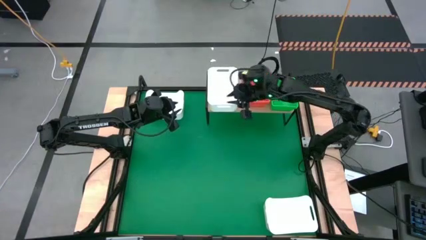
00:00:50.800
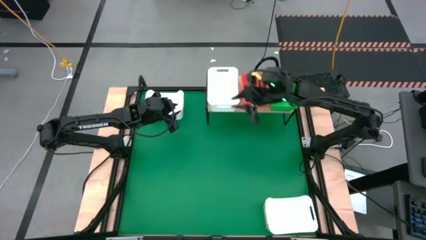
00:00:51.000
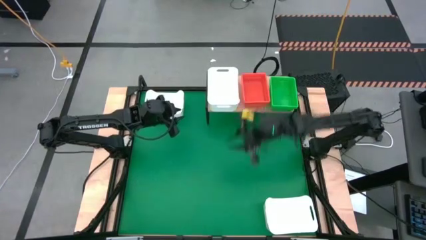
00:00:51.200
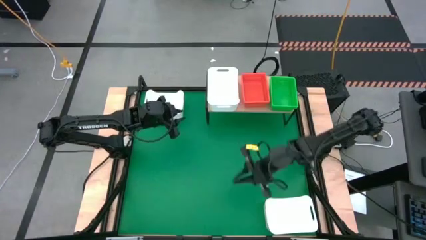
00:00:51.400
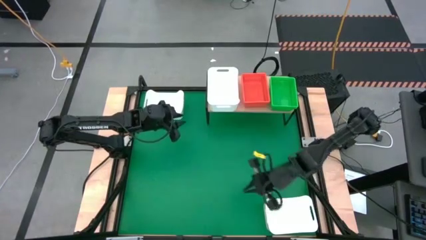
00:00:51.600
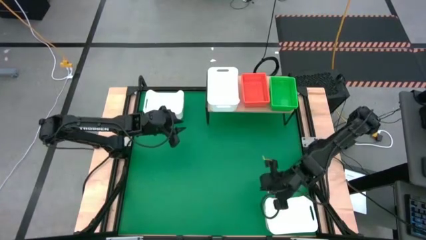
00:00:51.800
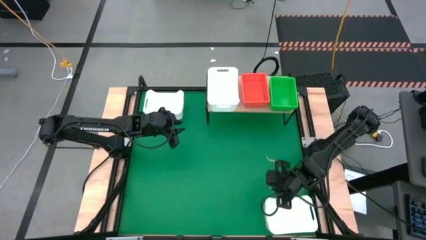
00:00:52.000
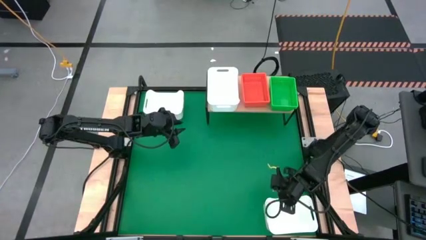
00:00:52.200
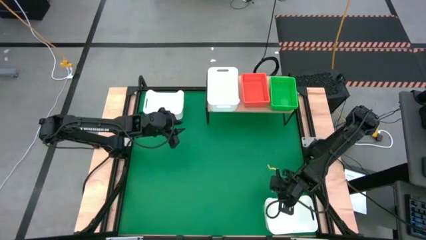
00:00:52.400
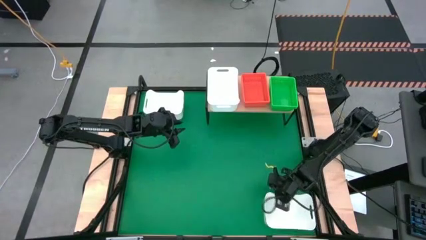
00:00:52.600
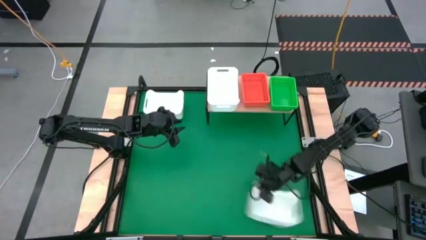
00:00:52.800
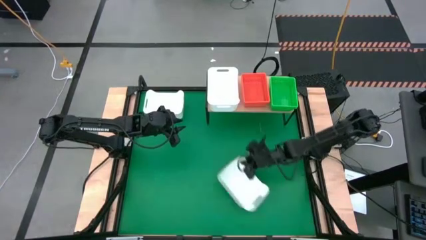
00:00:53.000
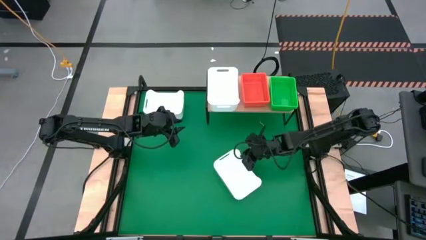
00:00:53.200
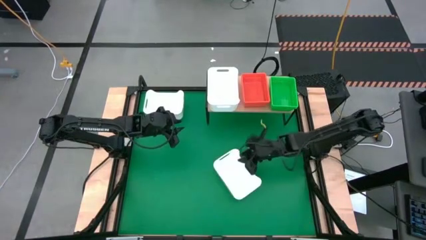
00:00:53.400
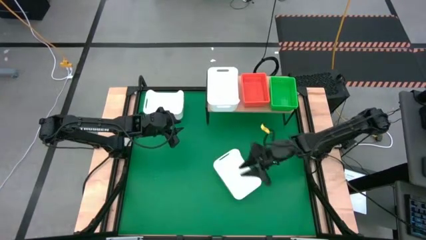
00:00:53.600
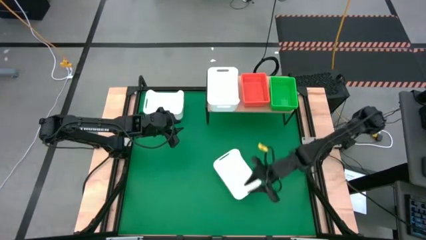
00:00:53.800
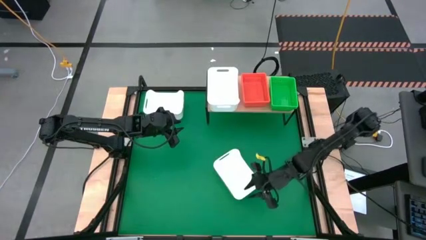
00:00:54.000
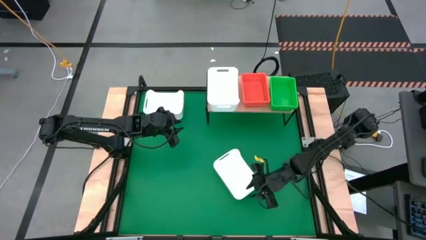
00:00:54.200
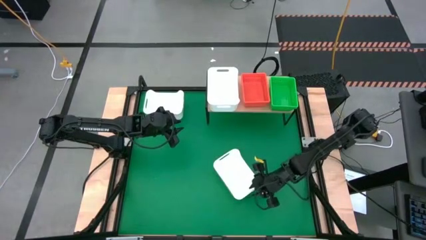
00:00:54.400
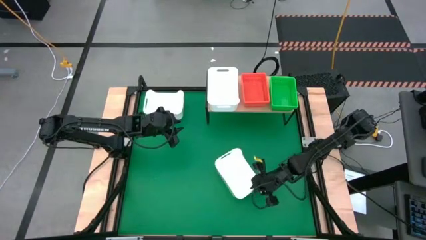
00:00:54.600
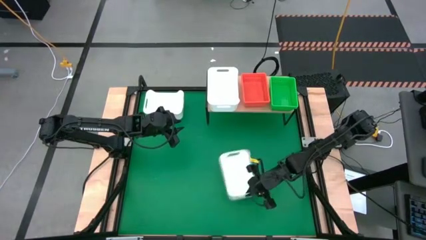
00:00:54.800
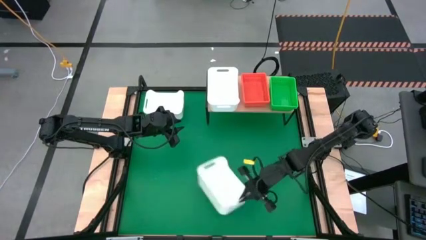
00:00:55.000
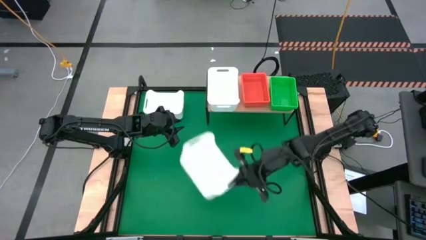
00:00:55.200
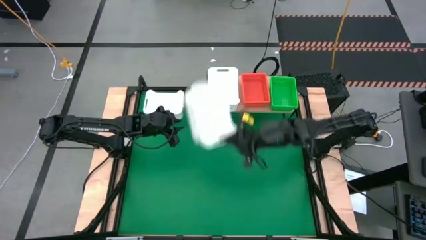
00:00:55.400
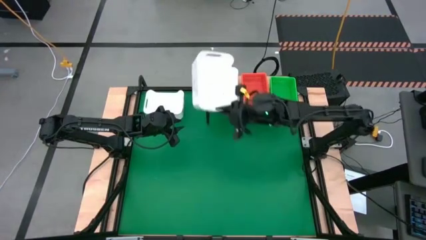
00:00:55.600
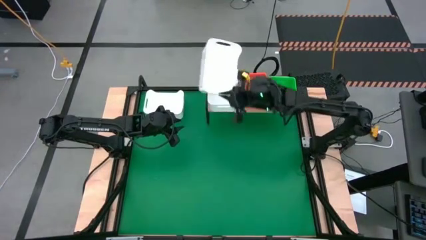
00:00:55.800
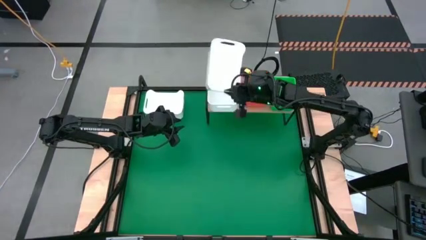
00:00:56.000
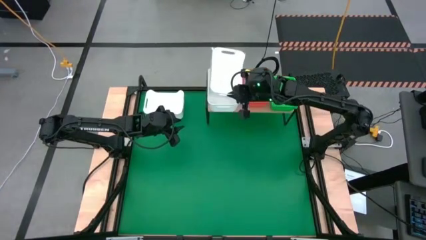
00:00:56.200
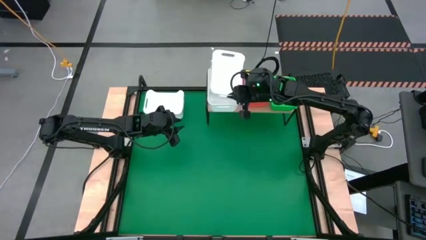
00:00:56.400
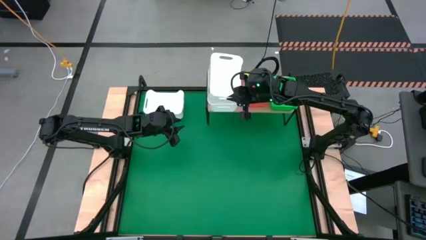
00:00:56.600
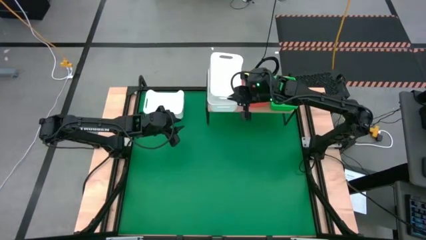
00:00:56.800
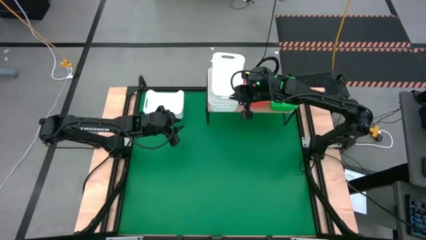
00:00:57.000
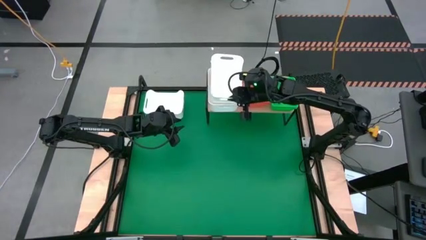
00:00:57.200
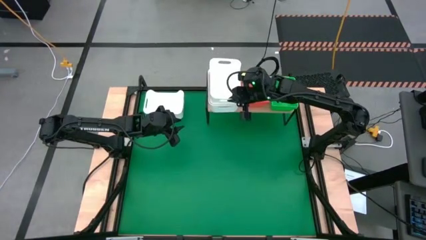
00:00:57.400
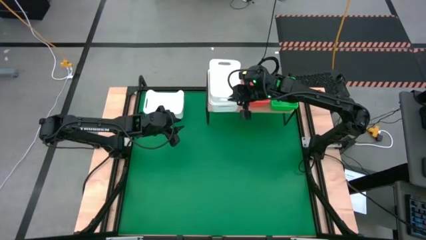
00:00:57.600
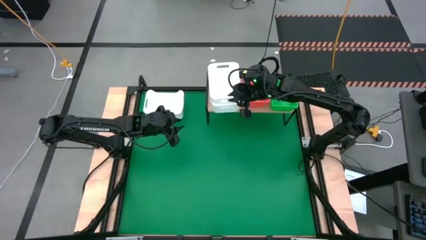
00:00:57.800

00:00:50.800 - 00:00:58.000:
Task: Stack baskets on shelf by color
Stack the bottom white bin on top of the white bin on the shelf

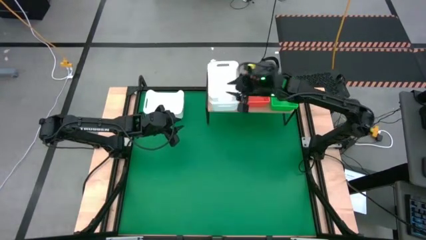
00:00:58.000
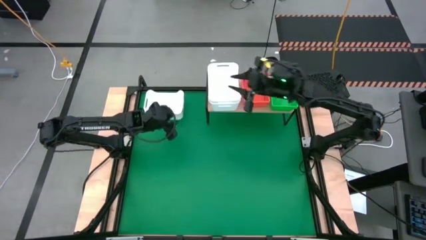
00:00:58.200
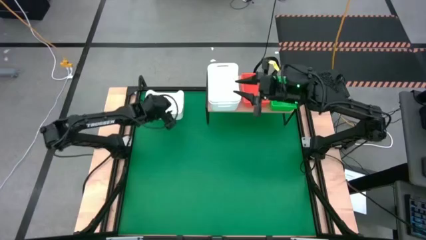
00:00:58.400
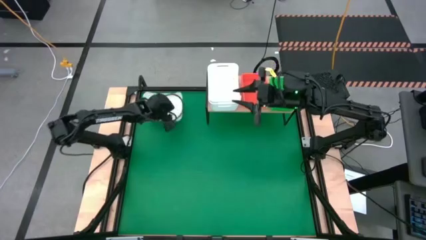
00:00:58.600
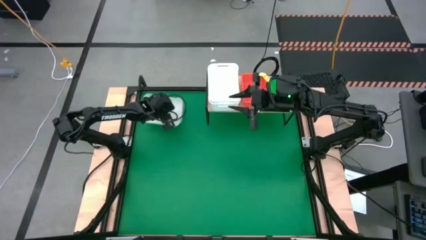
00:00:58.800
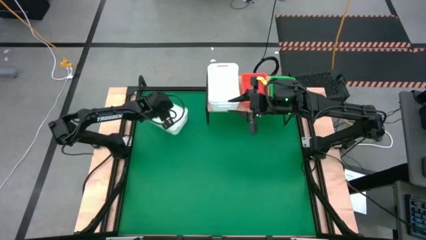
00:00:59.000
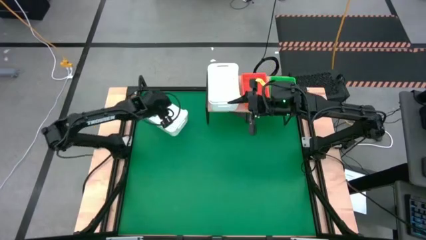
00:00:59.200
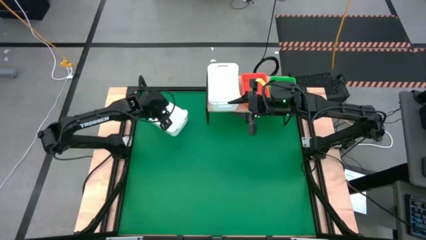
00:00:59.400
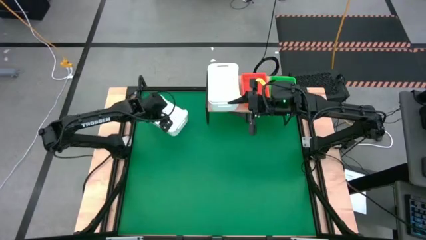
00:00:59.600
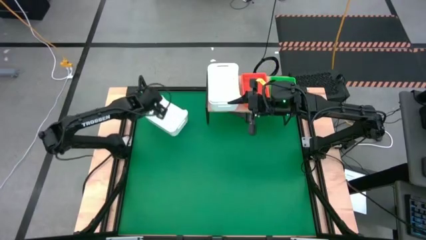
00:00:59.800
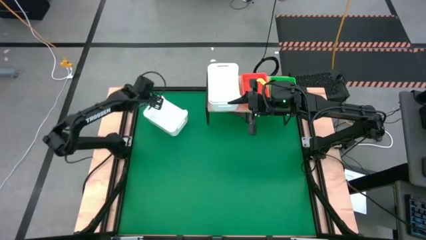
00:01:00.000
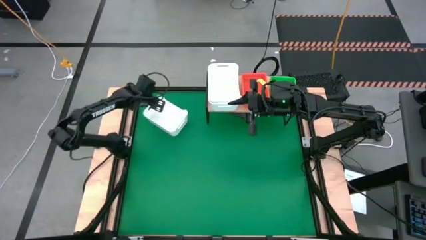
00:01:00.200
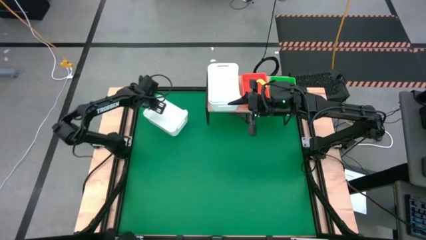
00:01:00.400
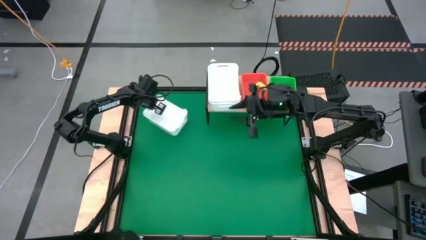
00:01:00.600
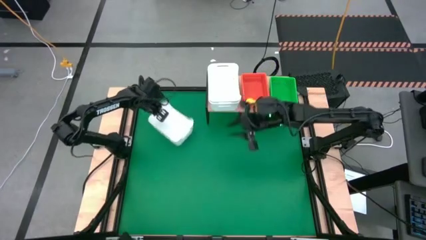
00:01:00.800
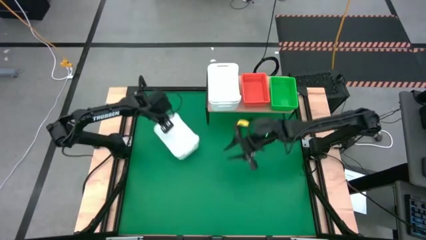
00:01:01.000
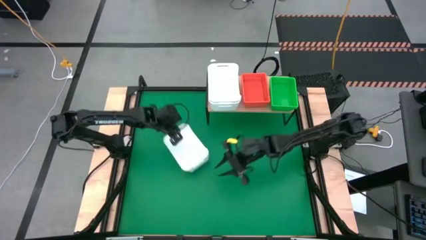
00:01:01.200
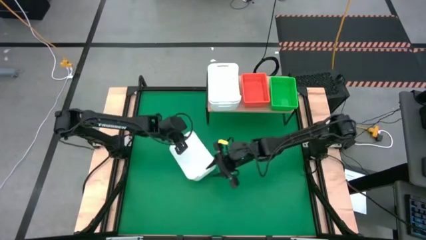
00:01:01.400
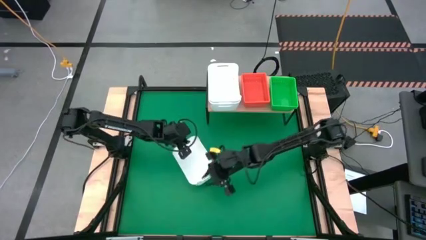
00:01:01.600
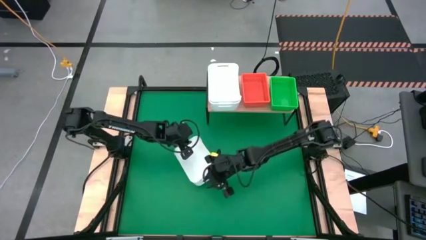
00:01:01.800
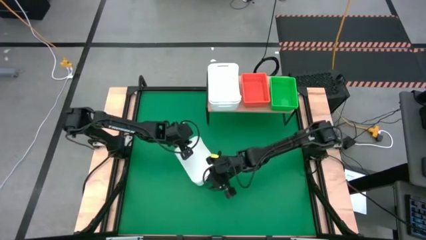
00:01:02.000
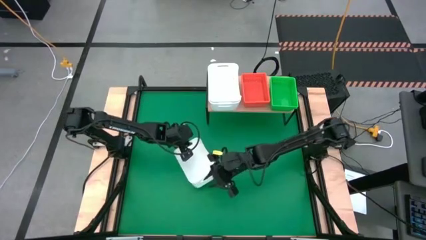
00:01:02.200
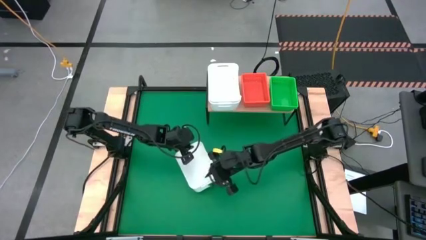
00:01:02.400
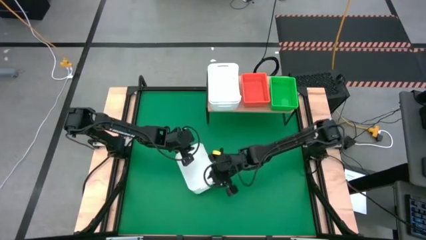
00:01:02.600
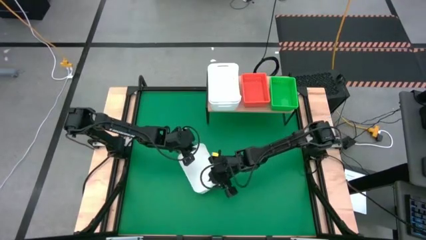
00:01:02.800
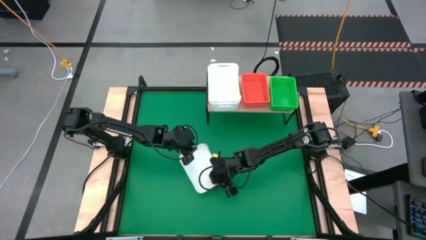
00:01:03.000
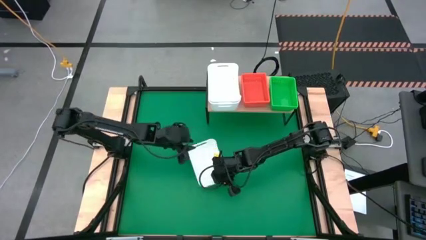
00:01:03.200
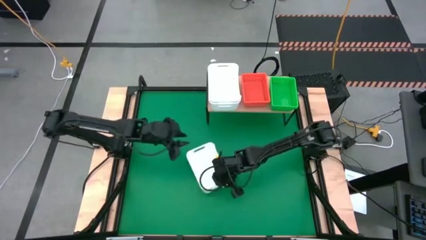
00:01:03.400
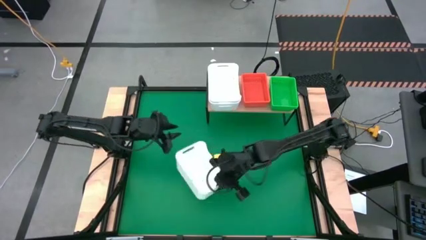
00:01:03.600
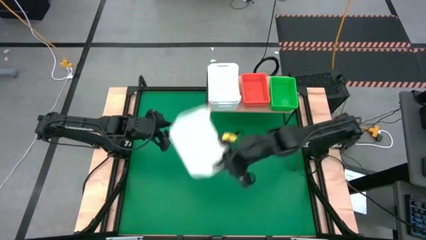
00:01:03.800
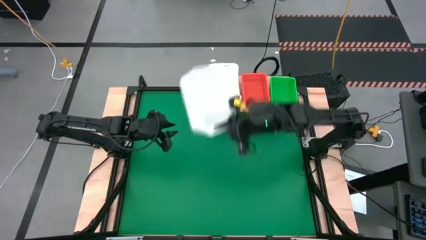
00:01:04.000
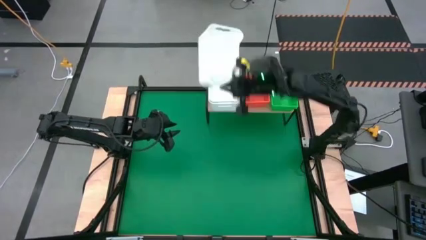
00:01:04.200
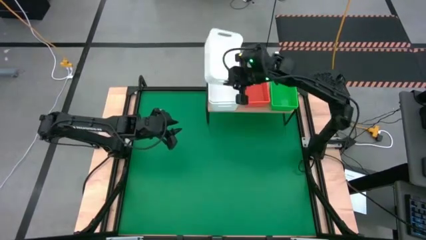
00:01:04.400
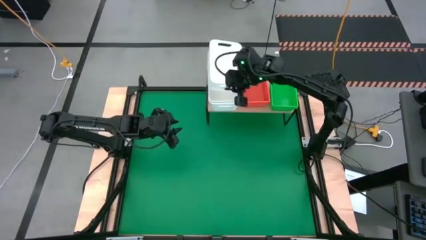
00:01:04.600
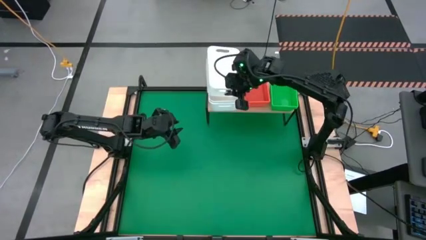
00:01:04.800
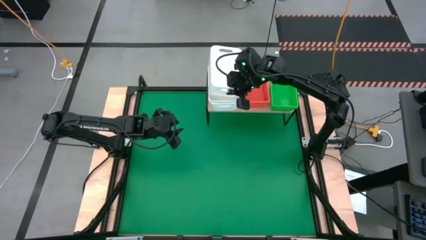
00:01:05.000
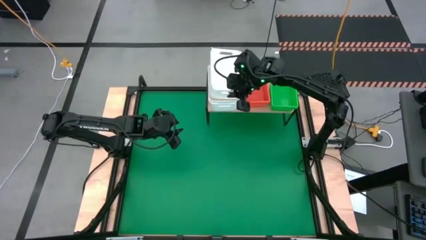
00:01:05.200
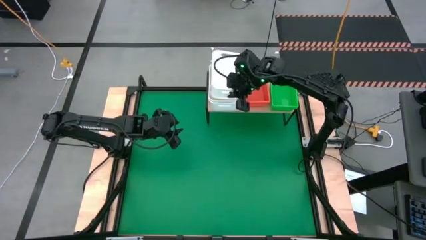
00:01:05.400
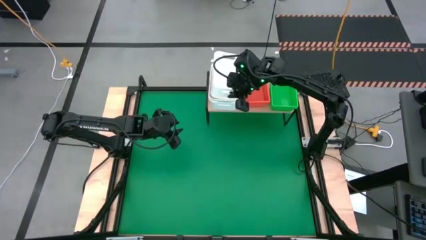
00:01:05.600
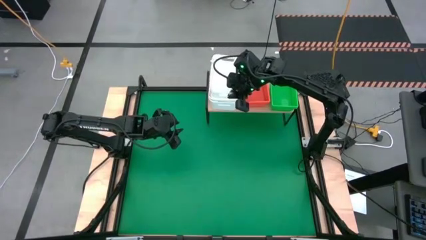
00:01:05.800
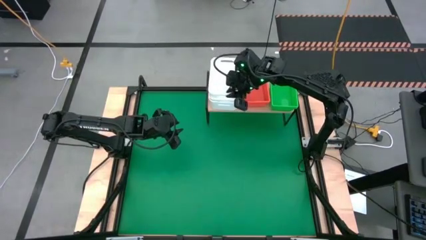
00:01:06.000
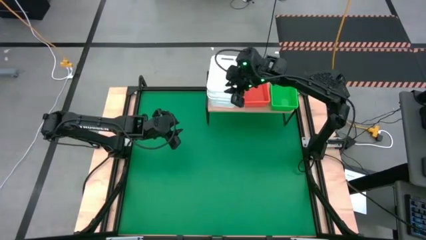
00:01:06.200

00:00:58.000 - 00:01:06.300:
Stack the white bin on top of the white bin on the shelf

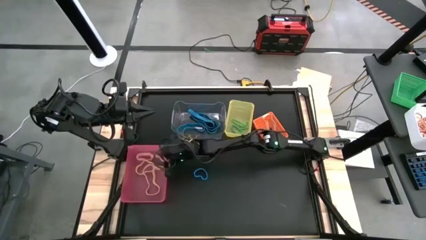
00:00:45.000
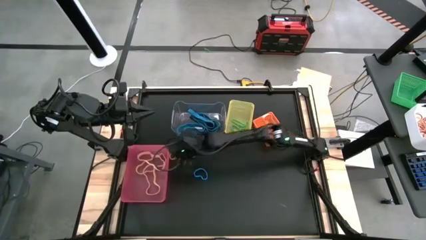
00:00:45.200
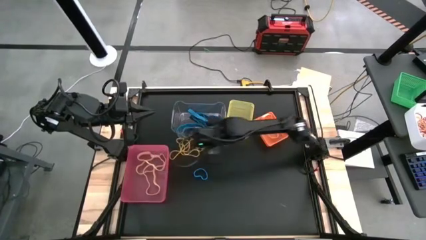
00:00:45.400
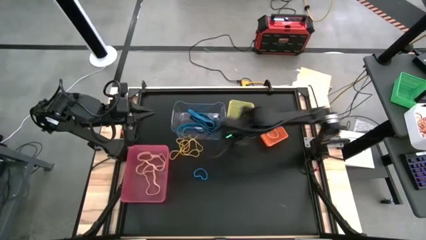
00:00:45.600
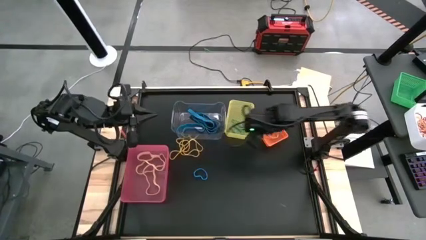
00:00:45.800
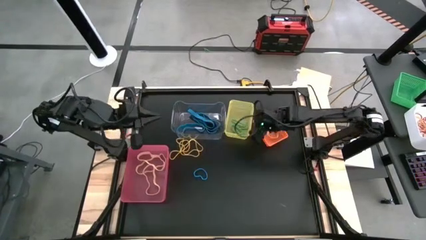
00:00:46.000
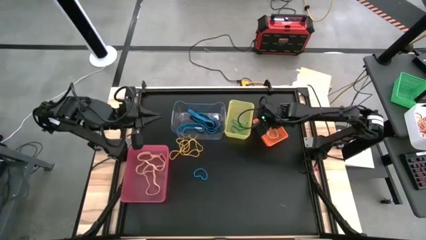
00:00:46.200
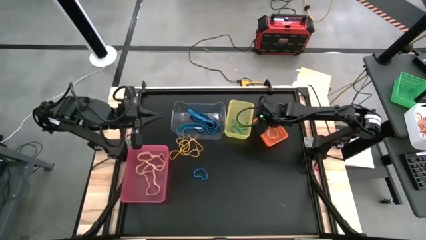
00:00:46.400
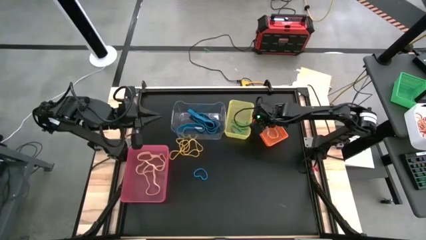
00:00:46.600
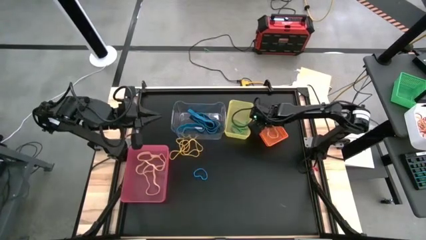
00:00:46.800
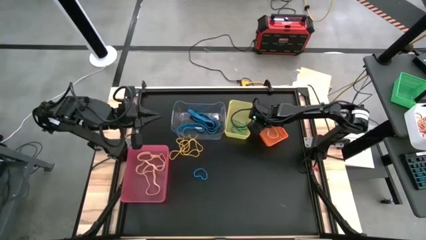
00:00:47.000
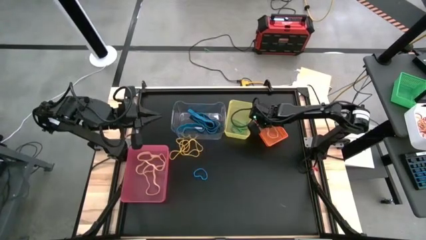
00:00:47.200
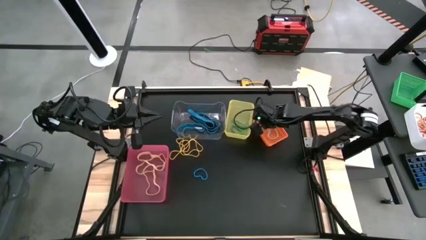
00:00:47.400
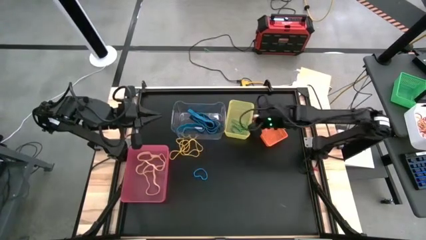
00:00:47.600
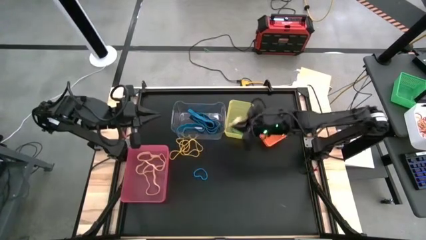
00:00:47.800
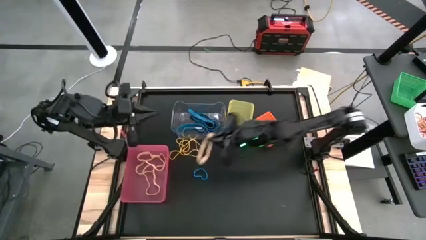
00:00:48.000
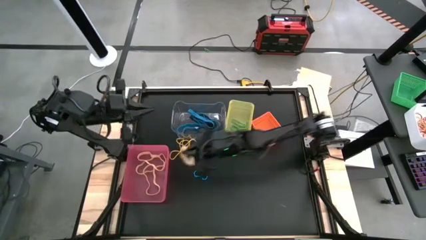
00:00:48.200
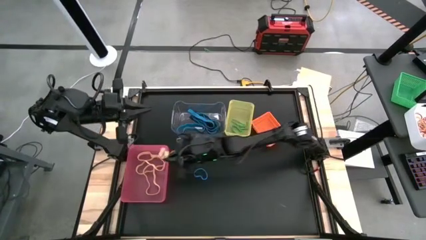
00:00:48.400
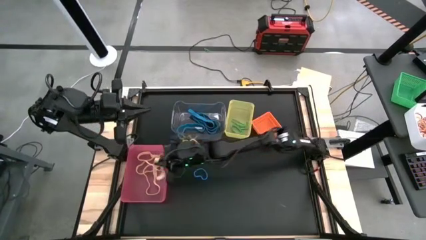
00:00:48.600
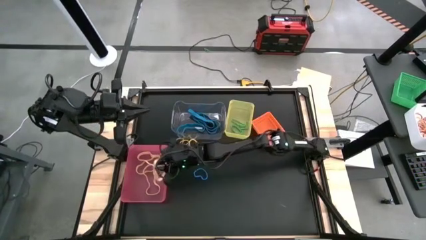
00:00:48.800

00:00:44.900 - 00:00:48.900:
Task: Sort rubber bands into baskets
Put the orange rubber band from the orange bin to the pink bin
